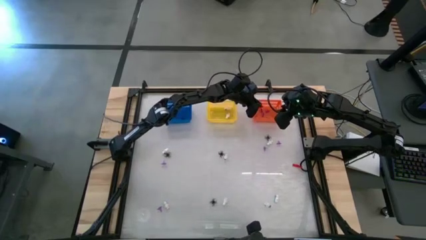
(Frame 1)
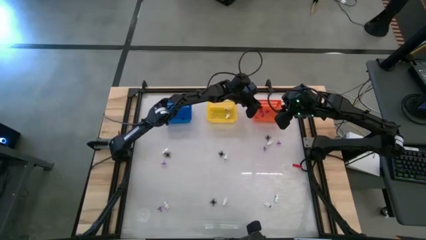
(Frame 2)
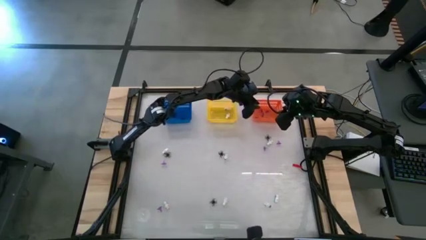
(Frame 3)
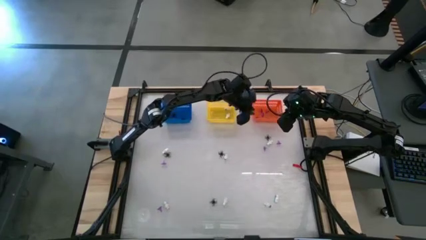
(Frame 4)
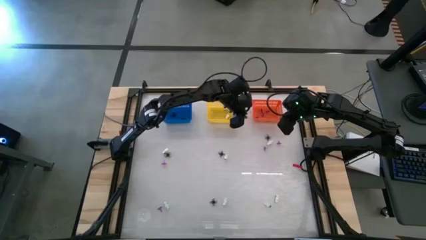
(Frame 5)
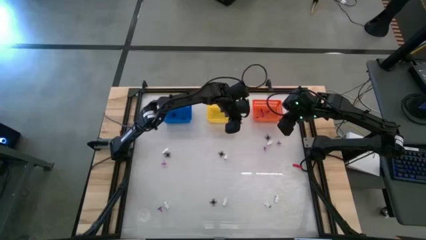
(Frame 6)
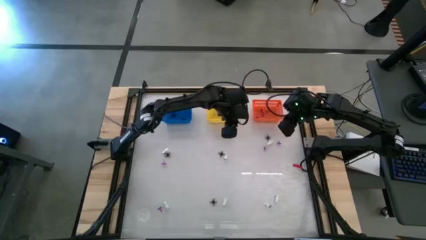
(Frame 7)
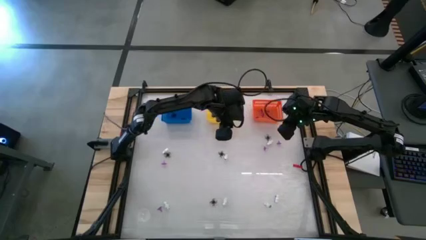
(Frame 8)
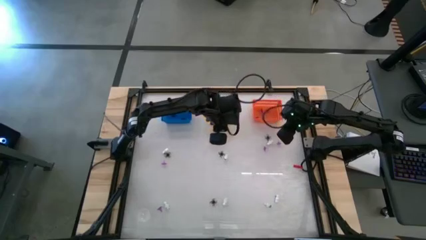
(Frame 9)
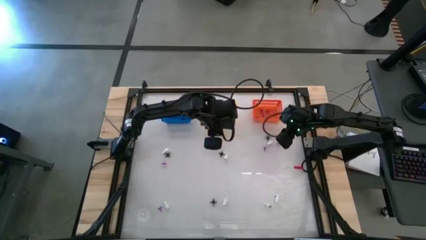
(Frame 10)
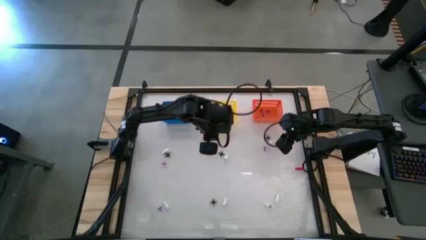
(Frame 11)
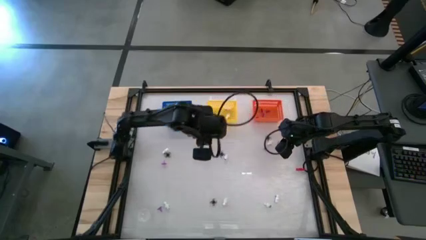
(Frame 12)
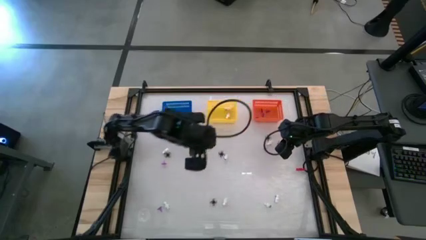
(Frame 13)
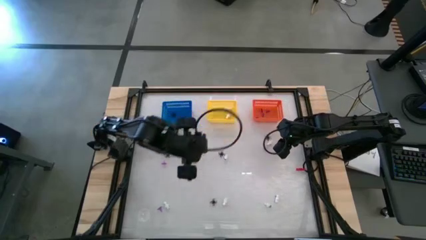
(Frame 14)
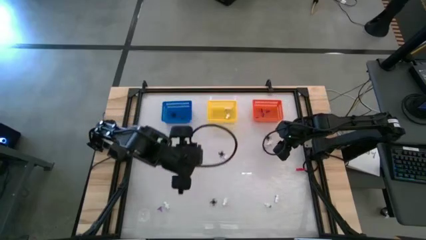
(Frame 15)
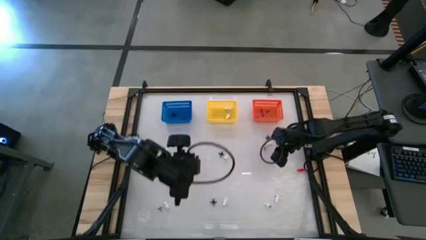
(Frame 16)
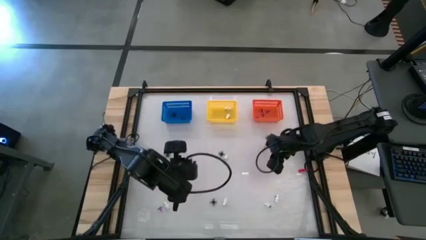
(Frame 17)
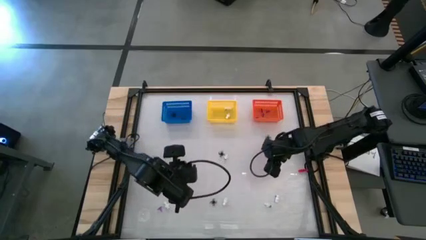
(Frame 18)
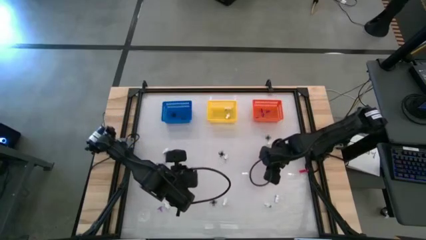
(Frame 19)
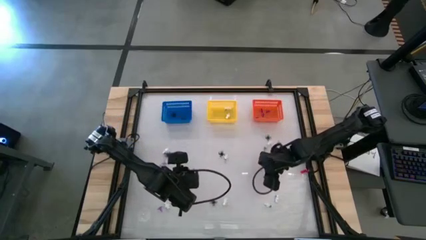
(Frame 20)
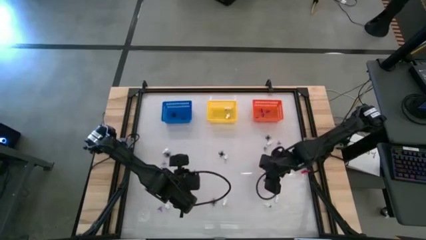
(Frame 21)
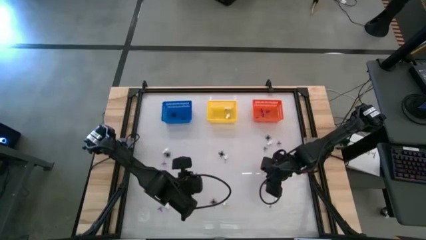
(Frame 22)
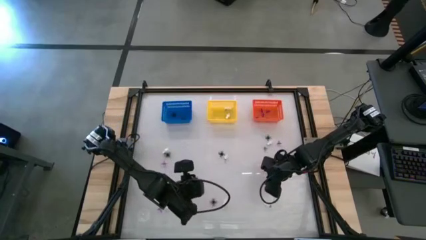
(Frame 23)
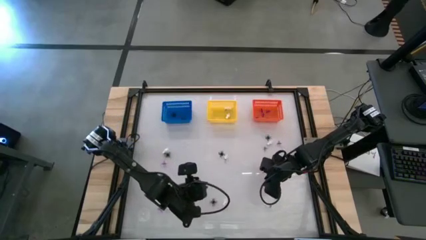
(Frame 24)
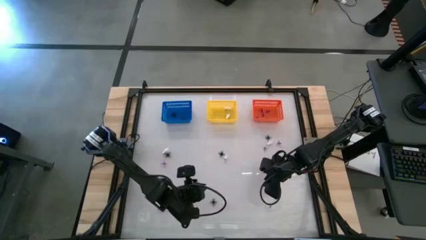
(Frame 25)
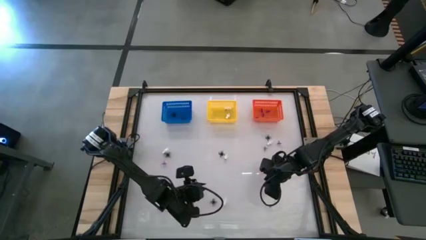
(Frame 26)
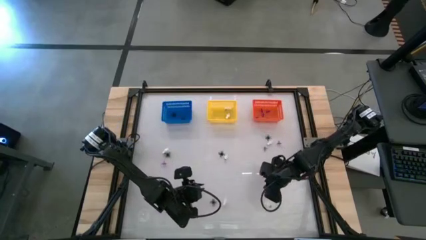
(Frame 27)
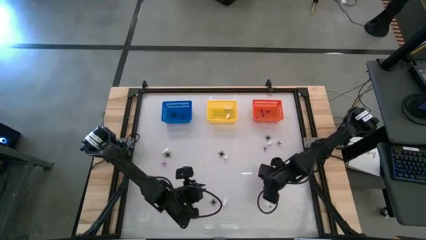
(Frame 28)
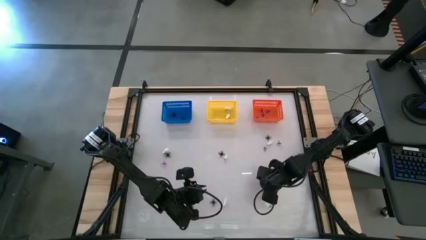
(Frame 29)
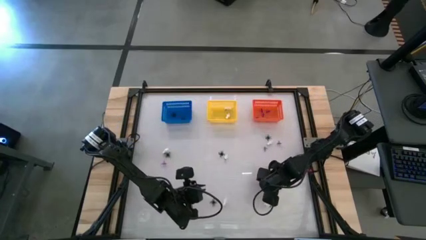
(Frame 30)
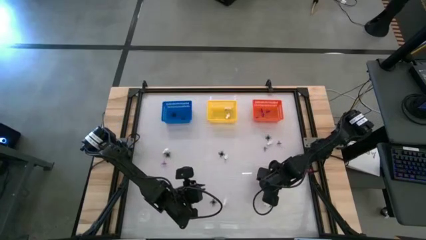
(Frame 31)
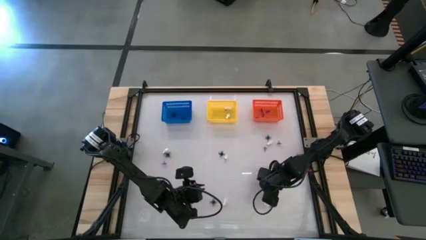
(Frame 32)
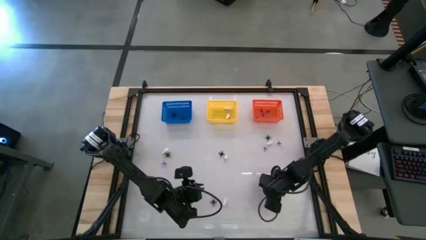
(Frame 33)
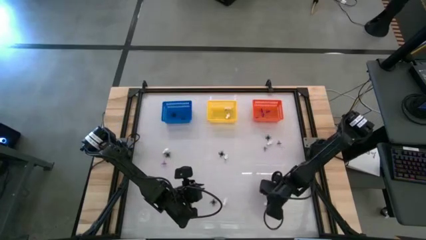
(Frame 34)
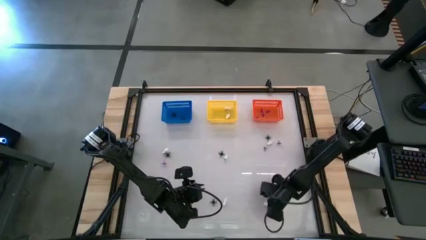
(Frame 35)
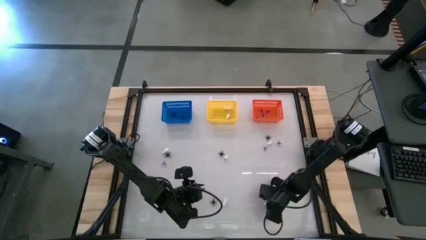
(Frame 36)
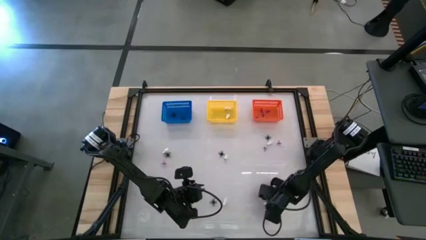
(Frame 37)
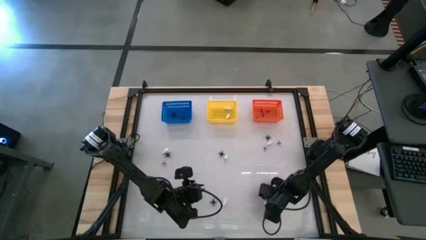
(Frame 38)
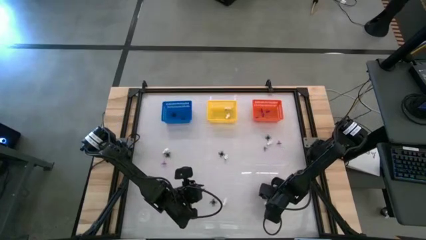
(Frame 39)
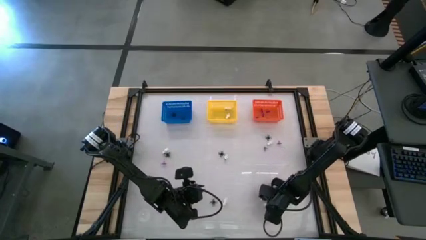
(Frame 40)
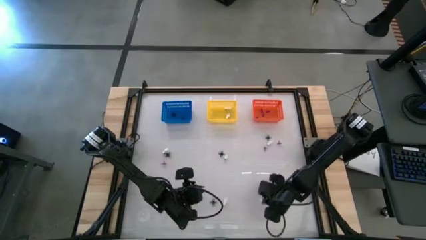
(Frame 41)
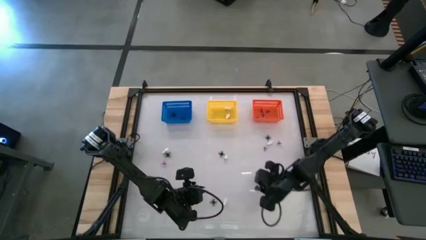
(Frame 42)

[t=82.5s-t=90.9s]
Task: Sort Halloween decoration
Put the white skeleton toy into the yellow basket

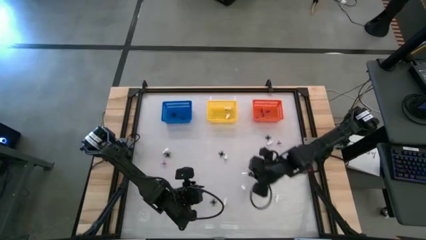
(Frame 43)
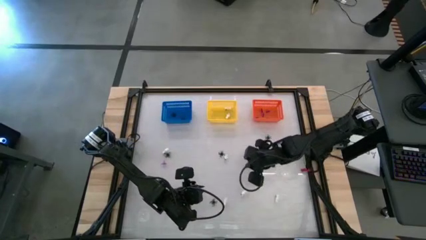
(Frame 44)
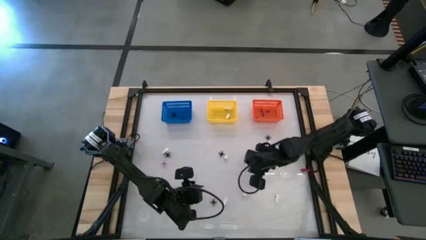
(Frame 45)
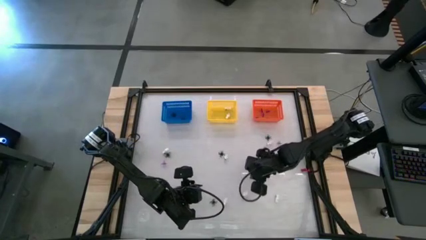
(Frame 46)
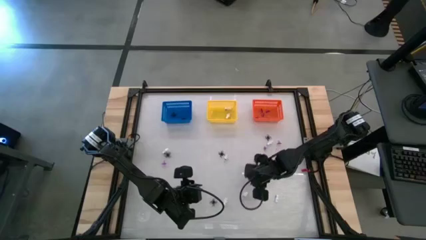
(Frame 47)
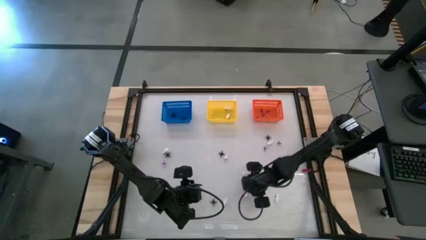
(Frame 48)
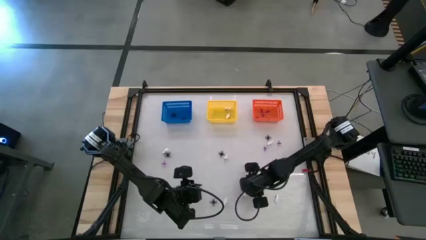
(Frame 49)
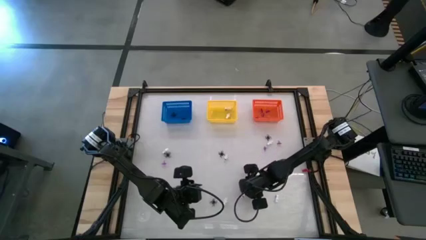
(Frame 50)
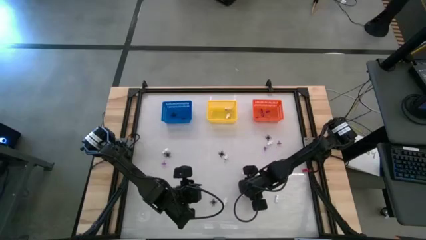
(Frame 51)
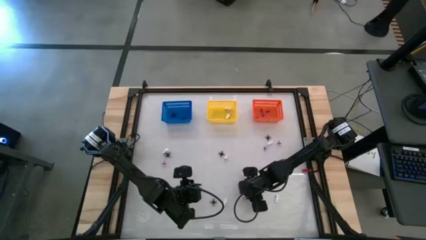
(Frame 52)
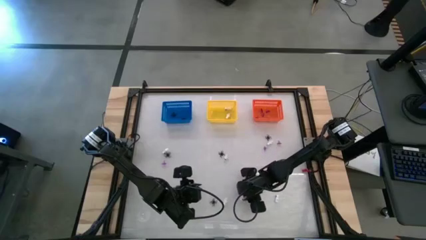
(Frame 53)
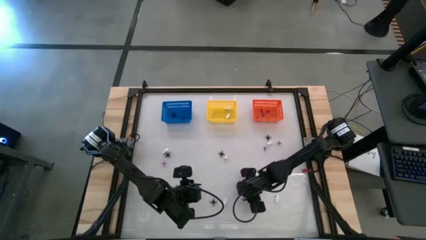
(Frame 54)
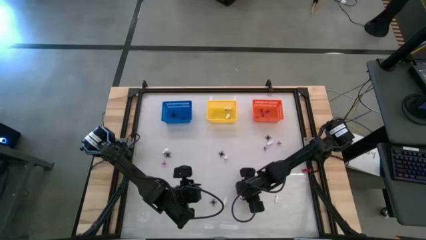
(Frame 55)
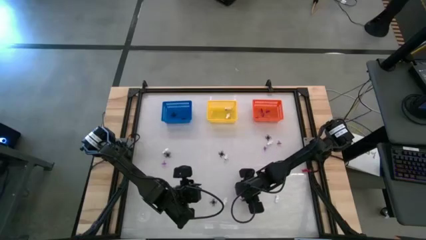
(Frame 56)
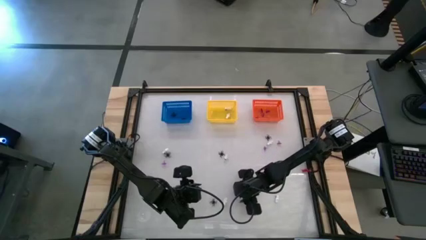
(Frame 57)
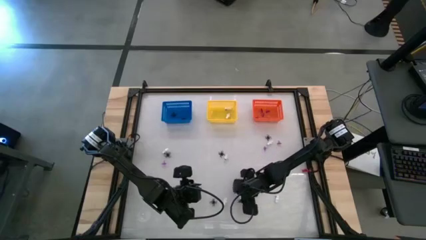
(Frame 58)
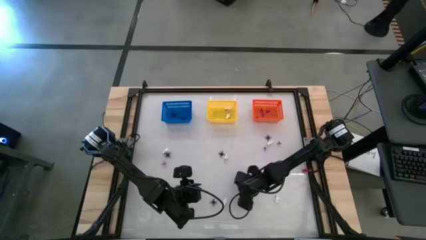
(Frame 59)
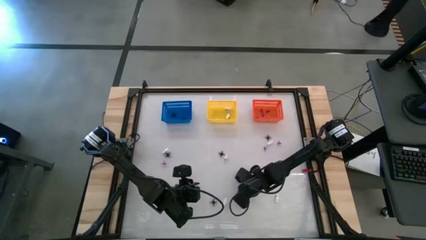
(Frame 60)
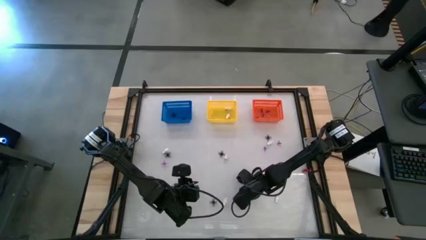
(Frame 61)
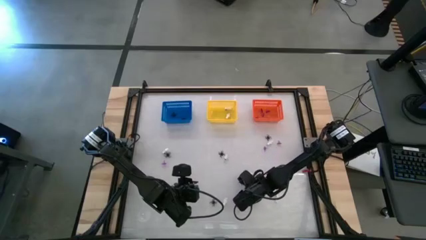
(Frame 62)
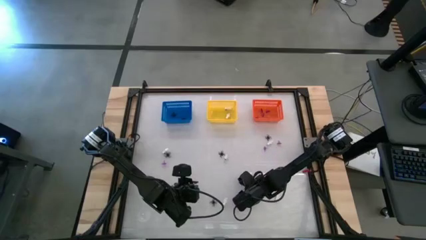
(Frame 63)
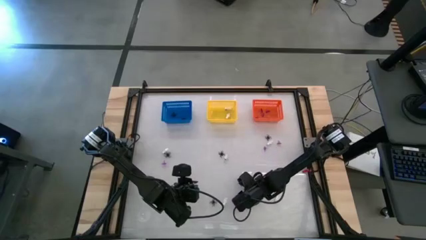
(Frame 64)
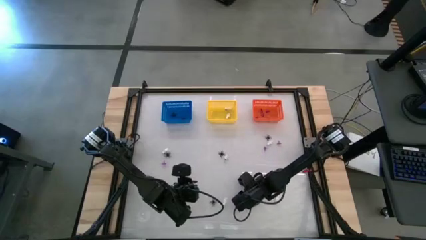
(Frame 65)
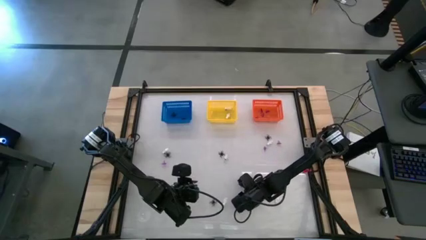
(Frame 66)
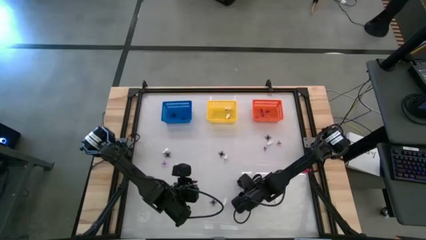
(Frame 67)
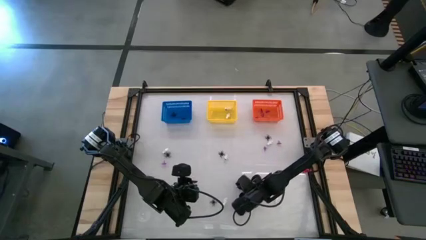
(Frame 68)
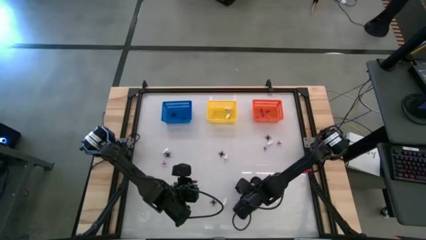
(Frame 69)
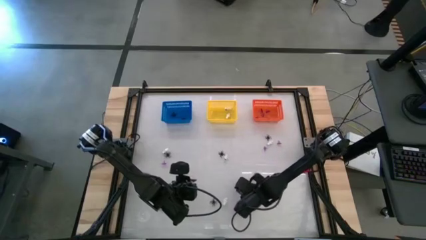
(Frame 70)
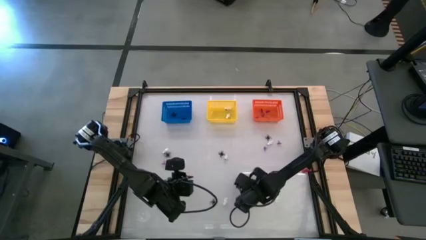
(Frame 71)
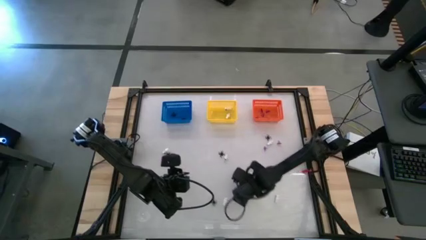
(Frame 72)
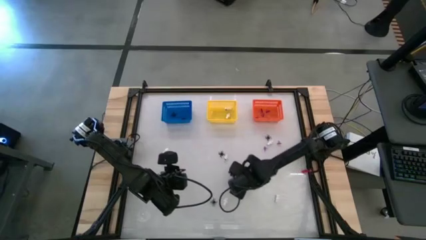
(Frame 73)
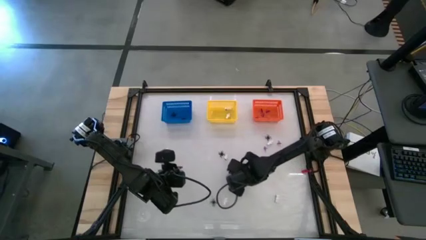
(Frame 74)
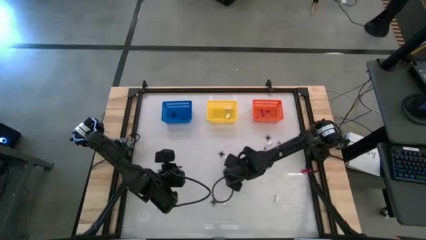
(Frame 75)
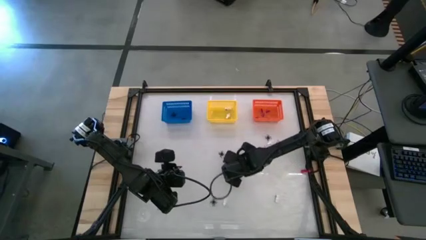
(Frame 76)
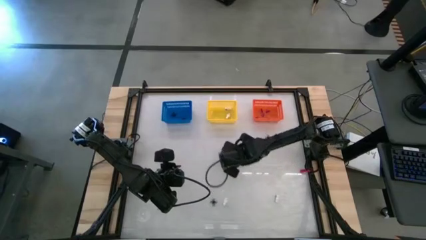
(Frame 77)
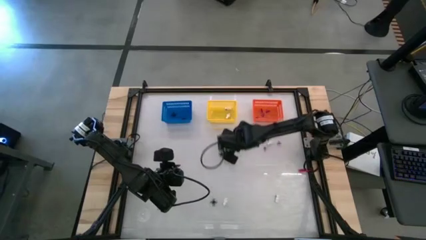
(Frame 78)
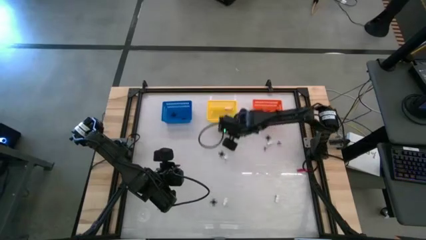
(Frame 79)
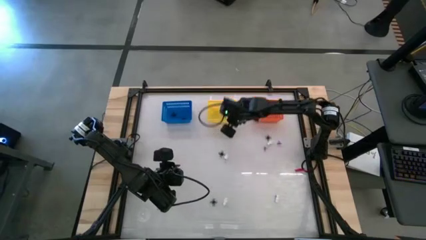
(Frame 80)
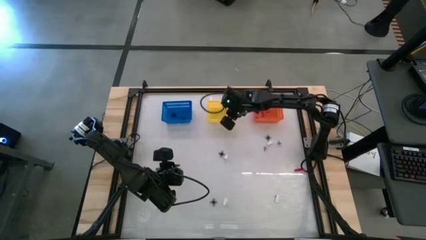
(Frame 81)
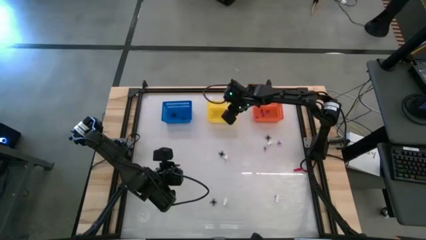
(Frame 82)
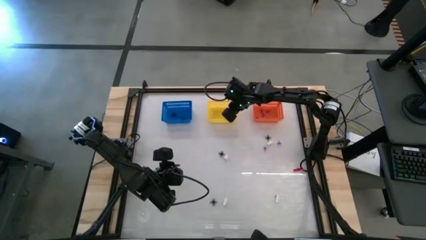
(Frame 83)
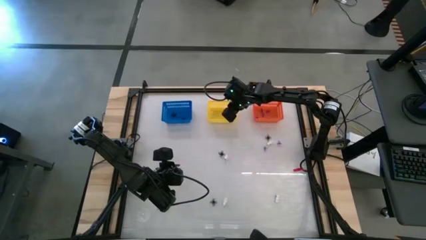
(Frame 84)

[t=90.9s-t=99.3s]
Put the white skeleton toy into the yellow basket

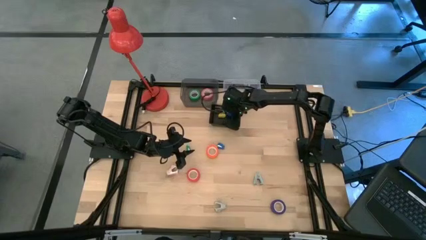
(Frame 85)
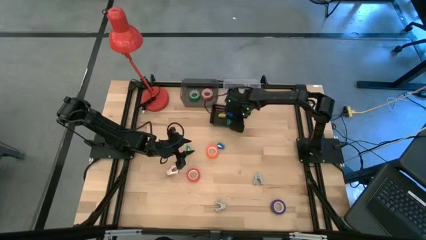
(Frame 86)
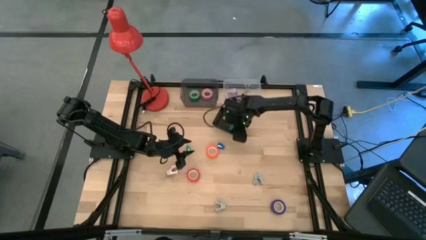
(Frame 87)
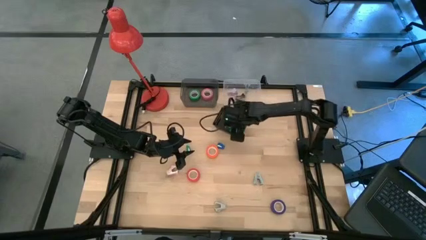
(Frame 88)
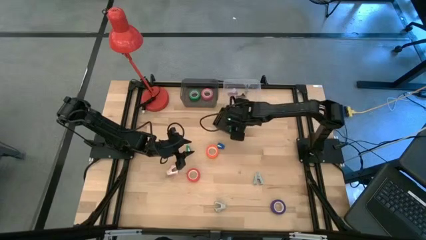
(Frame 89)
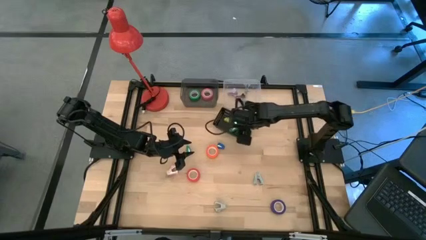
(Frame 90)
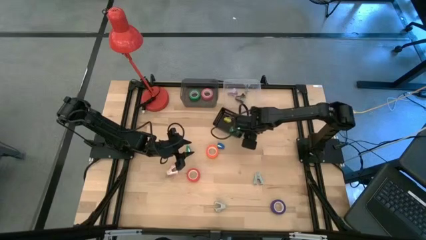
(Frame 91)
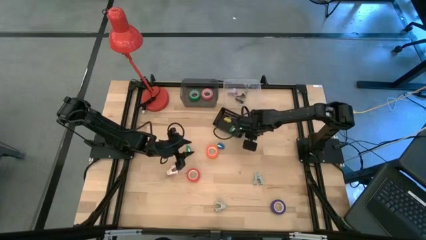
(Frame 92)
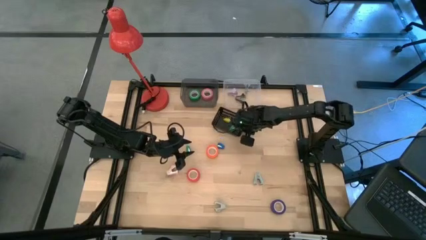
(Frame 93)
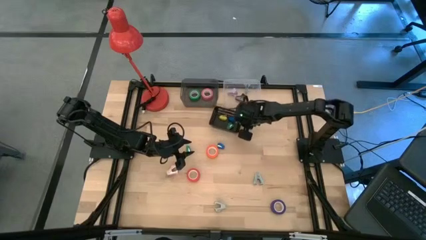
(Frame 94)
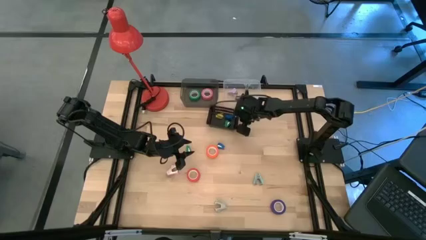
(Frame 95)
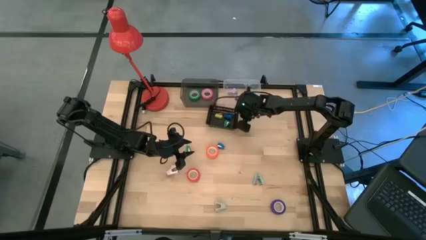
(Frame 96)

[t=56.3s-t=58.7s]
Task: Pick and place Stapler, Stapler remover, tape
Adjust the black bin on the table
